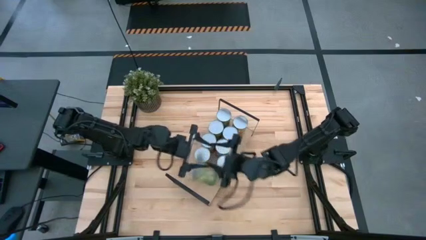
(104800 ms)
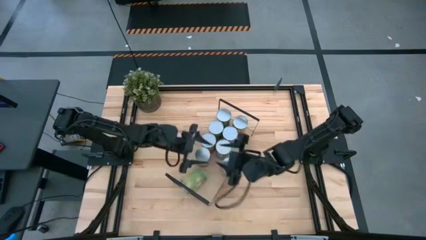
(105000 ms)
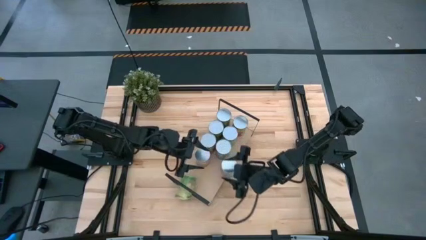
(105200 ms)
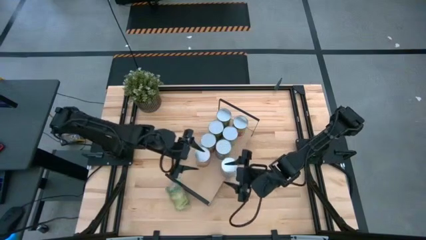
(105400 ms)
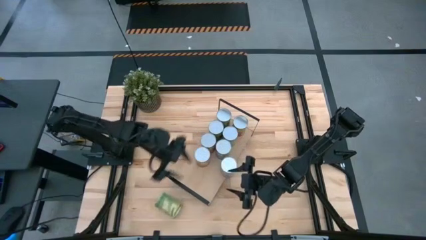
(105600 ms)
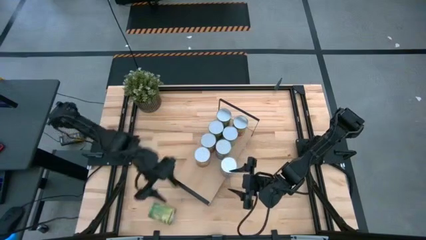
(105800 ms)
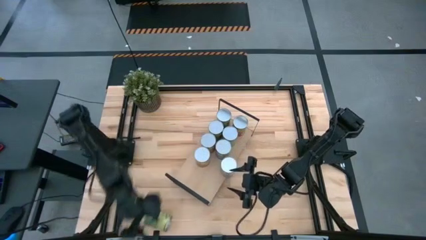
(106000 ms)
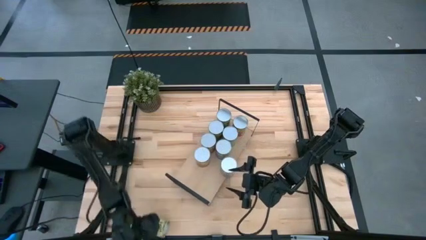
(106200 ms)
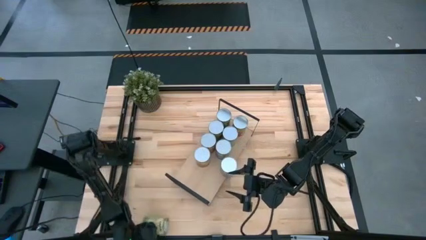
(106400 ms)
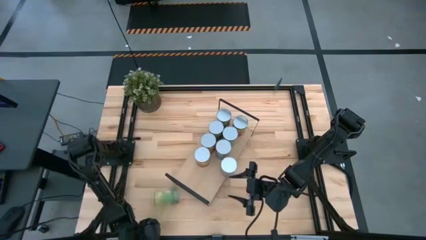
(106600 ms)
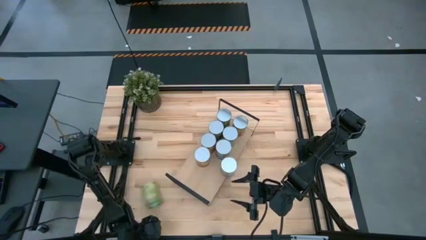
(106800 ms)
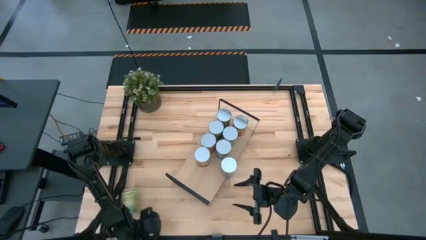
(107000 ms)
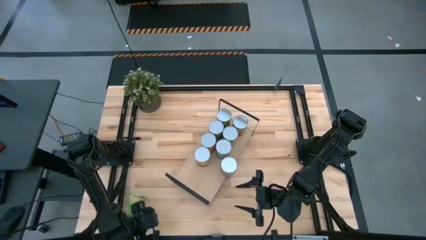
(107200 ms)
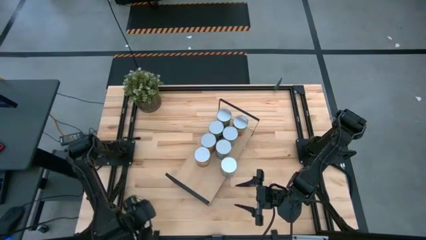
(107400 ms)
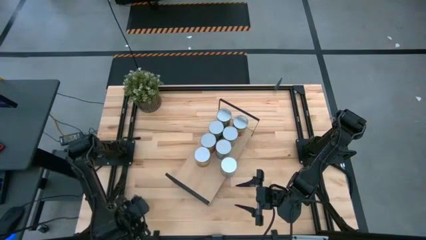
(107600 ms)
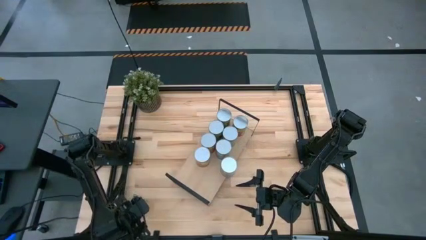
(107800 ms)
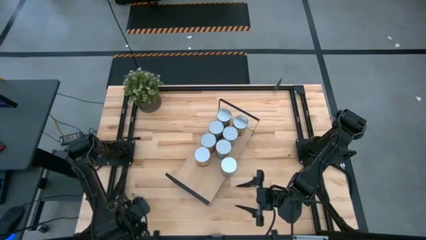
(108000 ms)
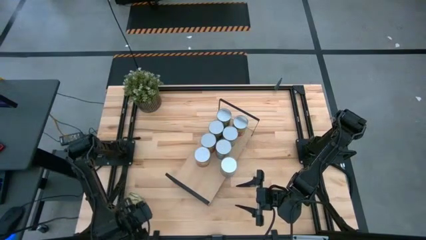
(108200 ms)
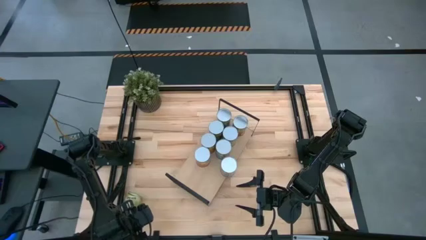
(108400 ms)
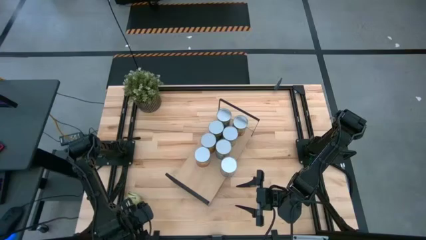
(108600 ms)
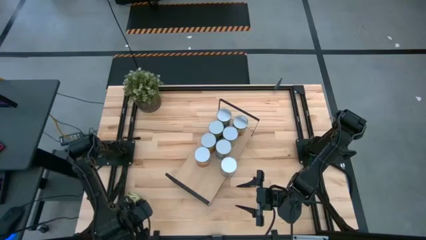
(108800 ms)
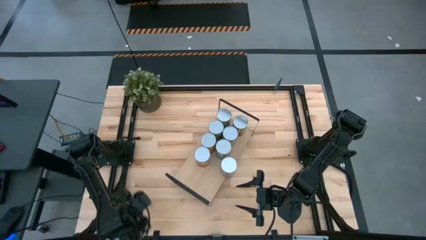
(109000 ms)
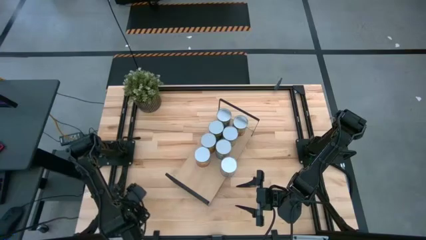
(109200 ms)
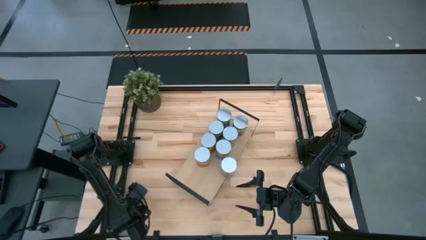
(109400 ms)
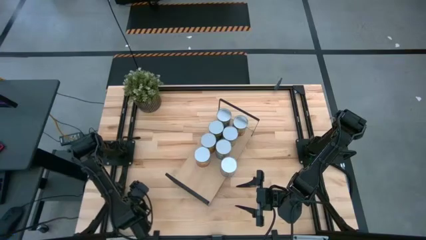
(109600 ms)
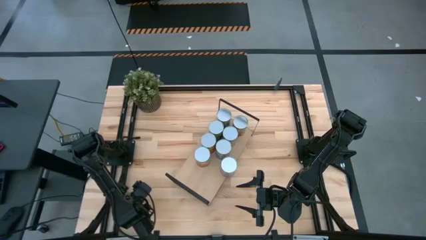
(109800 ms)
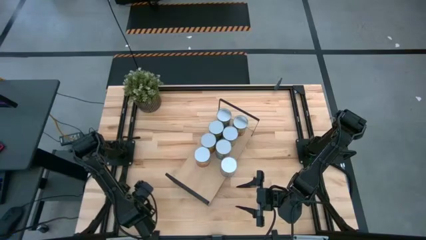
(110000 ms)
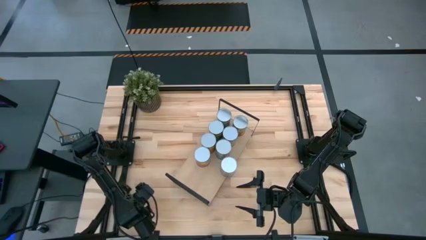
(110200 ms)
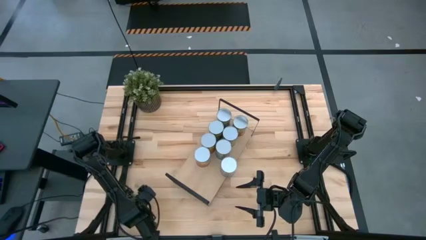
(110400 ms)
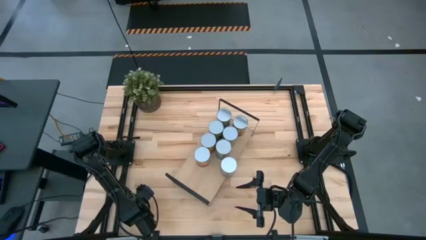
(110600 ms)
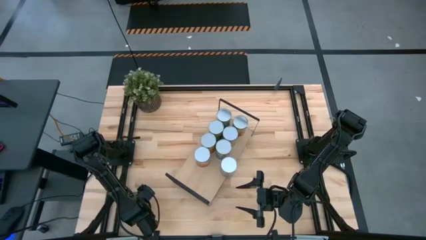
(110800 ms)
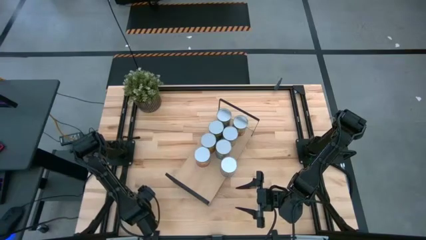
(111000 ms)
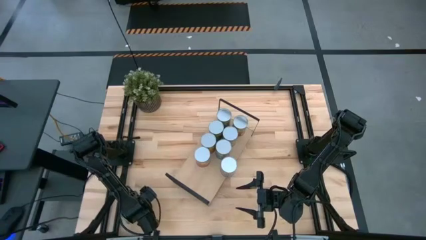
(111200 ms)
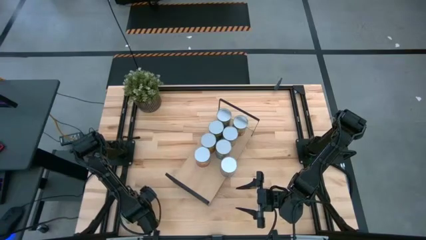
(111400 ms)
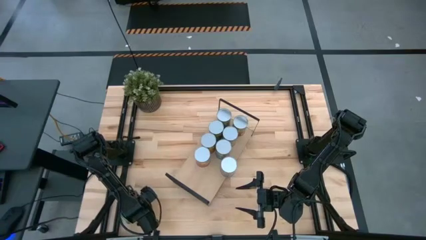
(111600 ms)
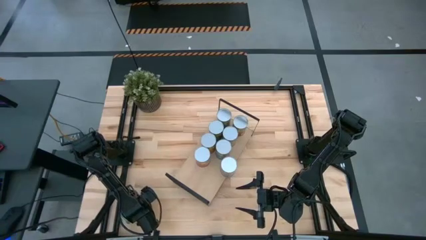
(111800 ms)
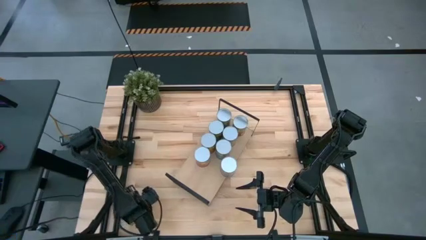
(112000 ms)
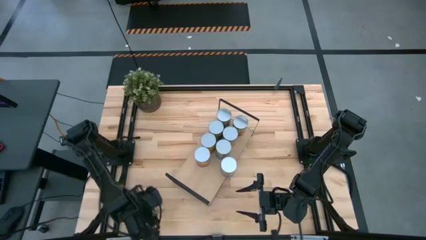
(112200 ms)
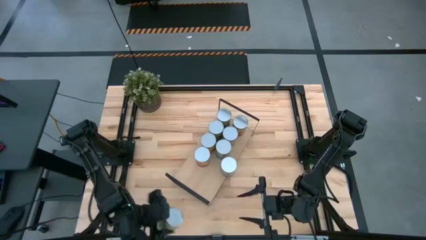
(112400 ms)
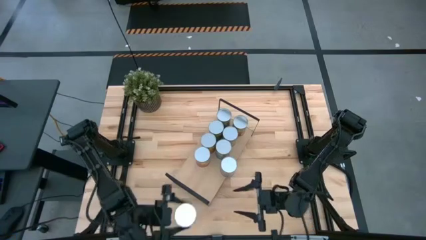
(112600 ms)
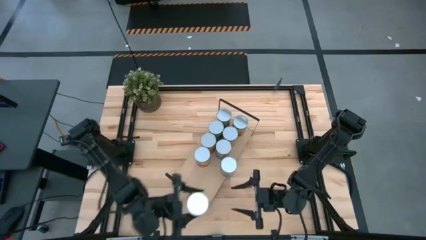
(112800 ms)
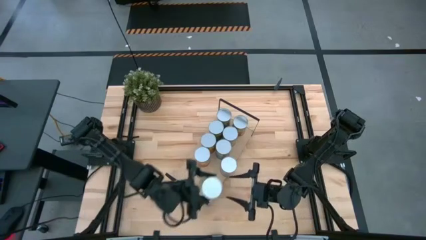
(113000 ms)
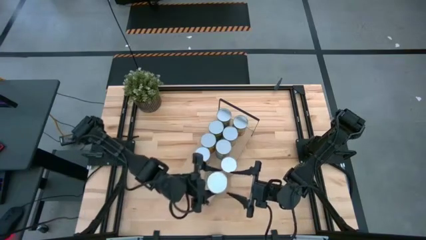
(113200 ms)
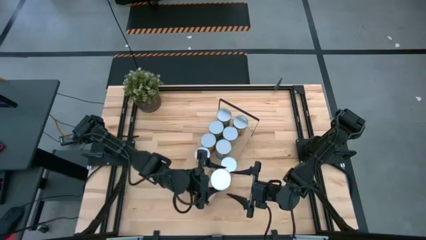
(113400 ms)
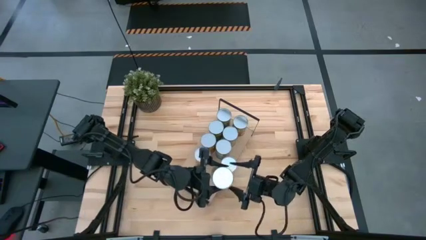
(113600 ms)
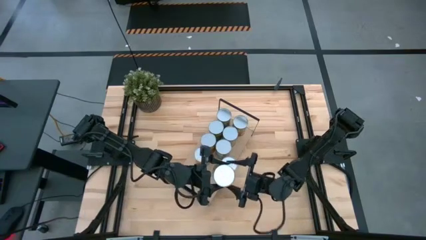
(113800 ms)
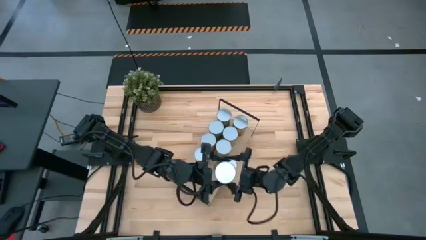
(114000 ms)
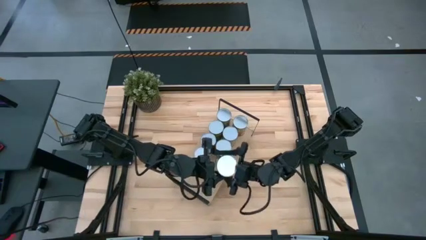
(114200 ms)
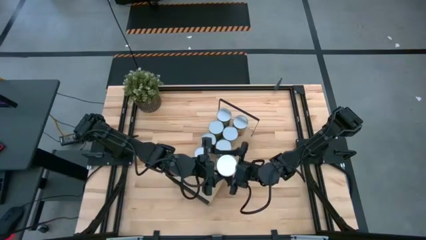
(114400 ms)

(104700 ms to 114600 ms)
Task: Pick and place cans onto a shelf
Put the canned pears on the shelf

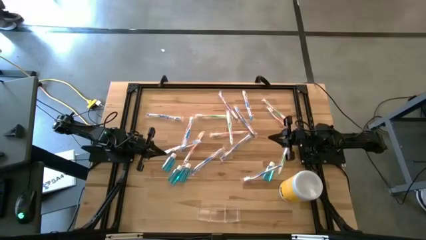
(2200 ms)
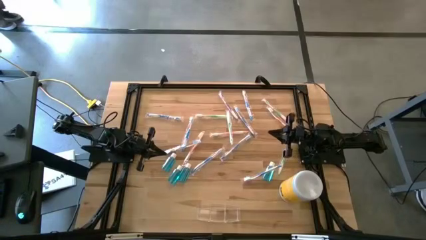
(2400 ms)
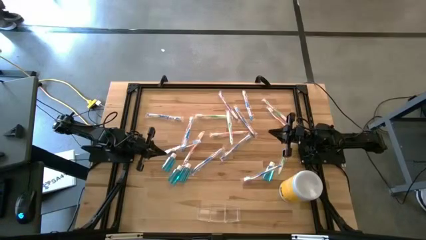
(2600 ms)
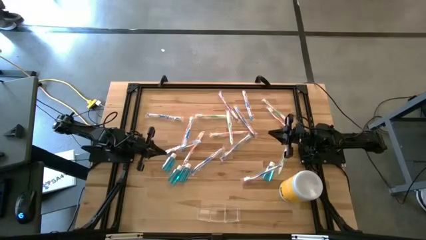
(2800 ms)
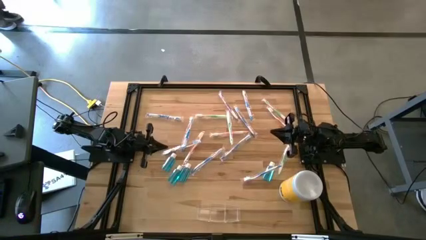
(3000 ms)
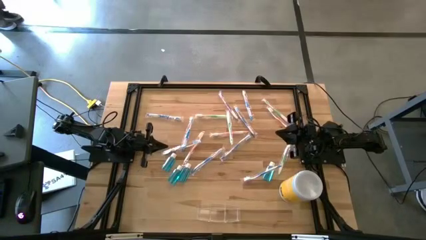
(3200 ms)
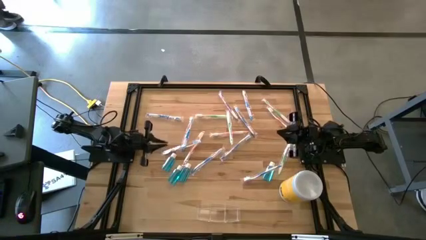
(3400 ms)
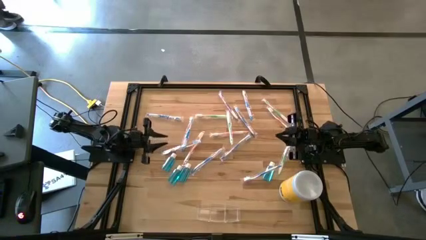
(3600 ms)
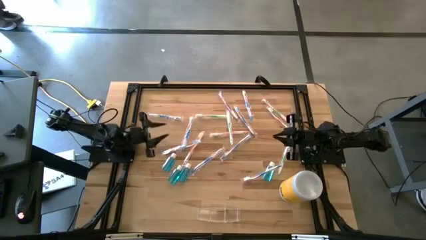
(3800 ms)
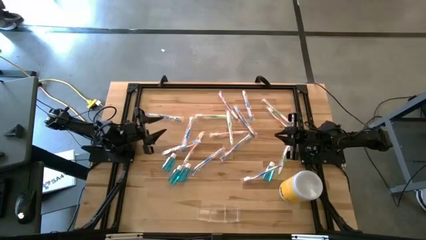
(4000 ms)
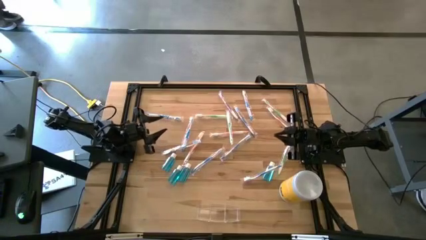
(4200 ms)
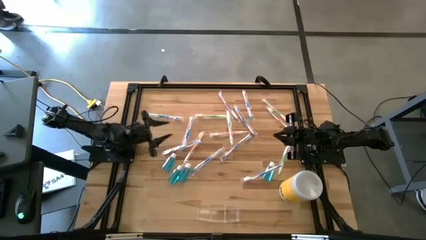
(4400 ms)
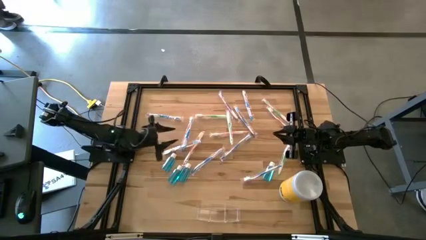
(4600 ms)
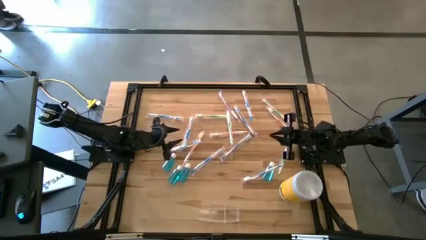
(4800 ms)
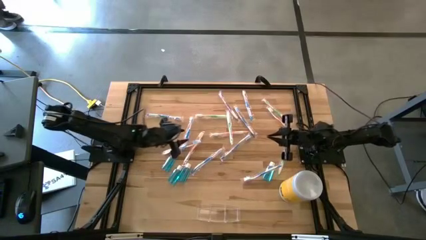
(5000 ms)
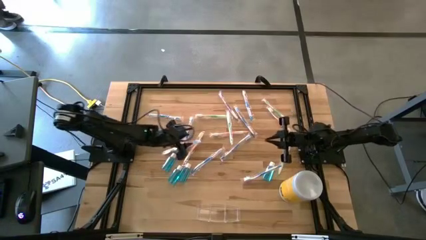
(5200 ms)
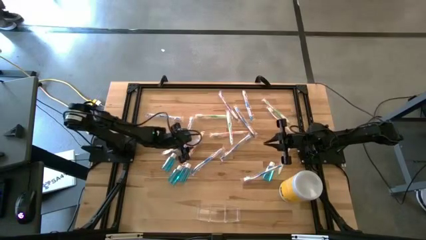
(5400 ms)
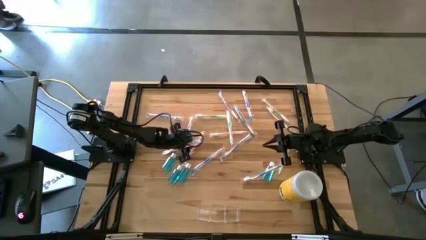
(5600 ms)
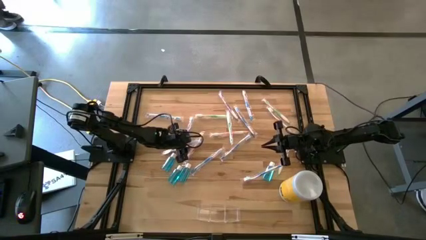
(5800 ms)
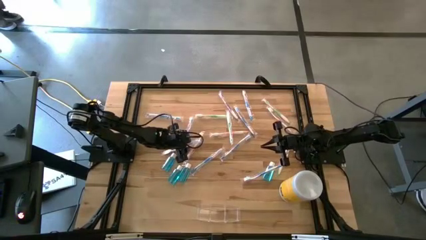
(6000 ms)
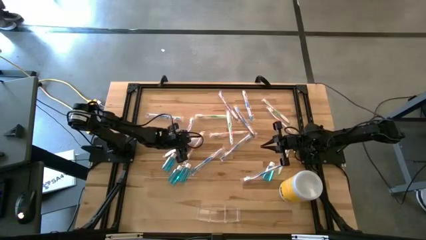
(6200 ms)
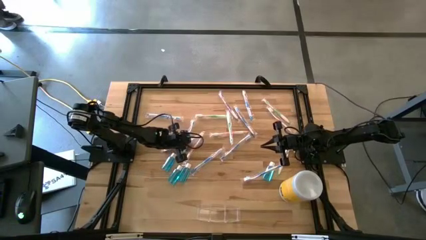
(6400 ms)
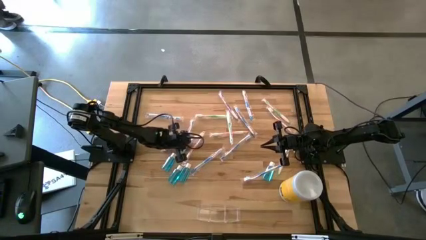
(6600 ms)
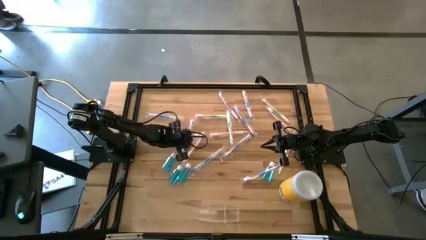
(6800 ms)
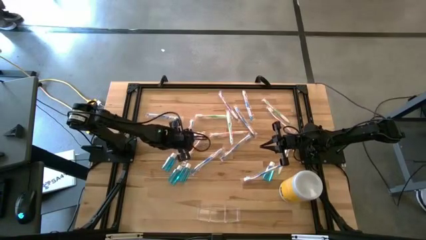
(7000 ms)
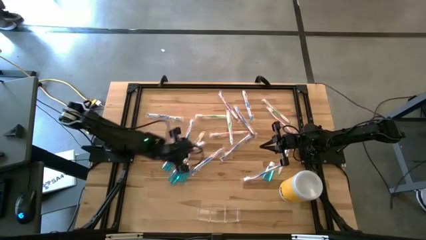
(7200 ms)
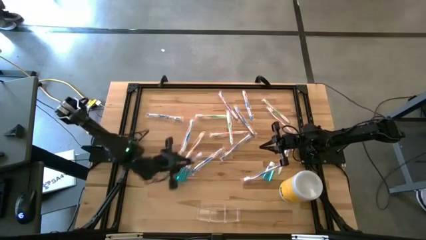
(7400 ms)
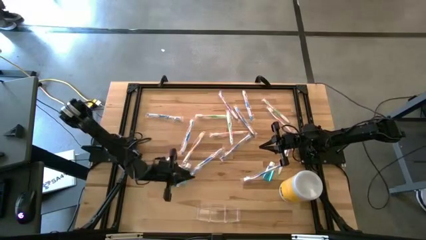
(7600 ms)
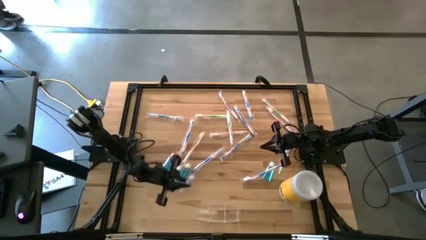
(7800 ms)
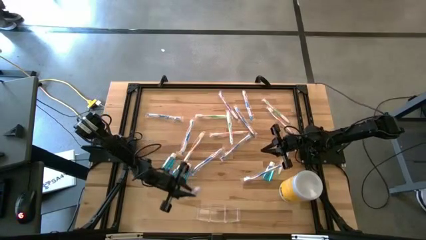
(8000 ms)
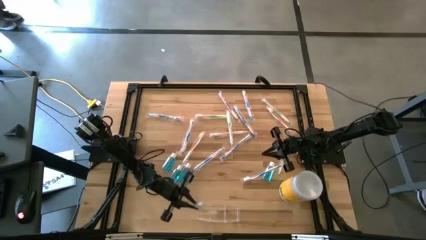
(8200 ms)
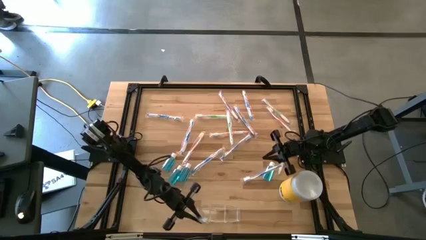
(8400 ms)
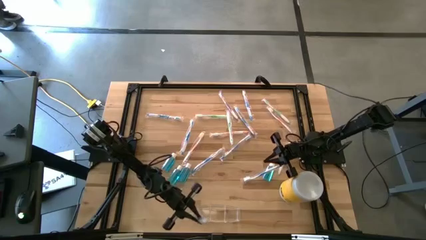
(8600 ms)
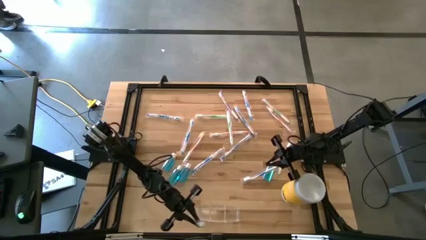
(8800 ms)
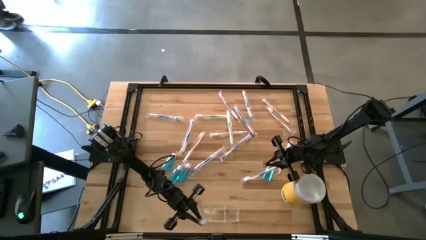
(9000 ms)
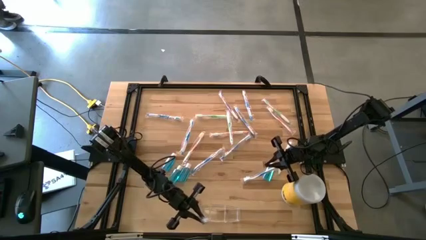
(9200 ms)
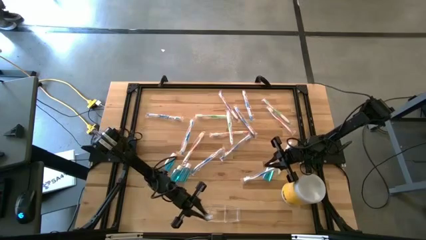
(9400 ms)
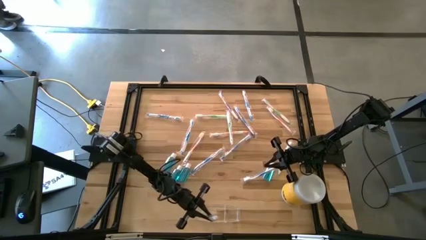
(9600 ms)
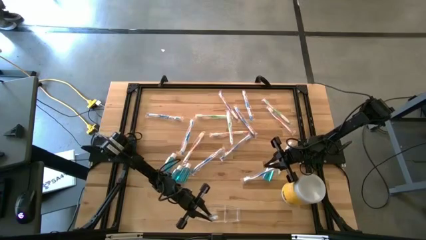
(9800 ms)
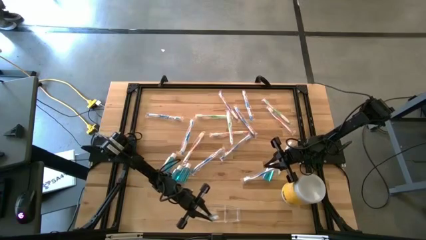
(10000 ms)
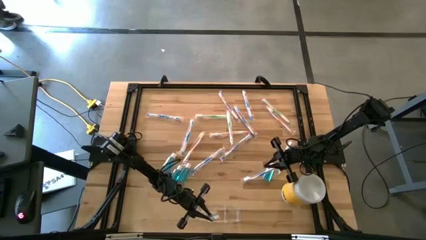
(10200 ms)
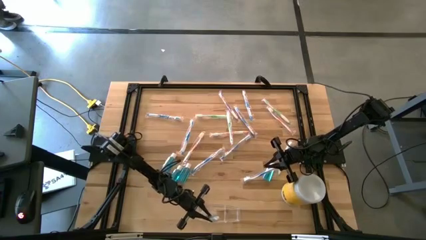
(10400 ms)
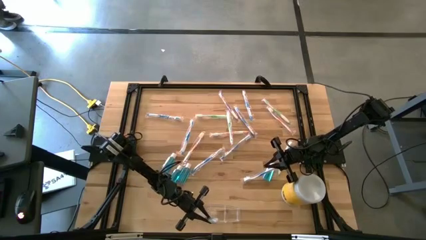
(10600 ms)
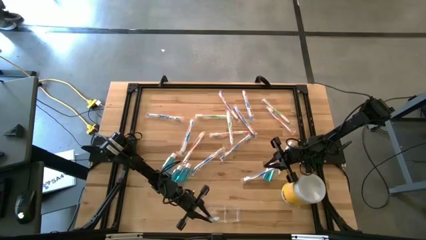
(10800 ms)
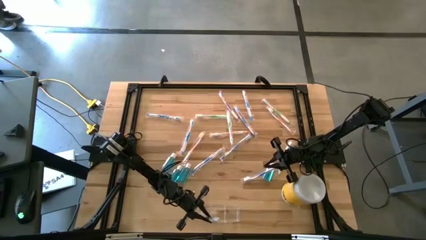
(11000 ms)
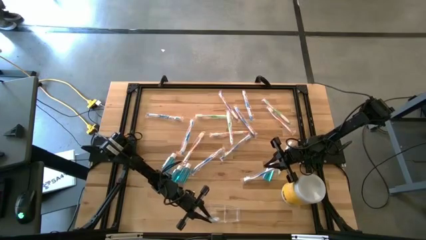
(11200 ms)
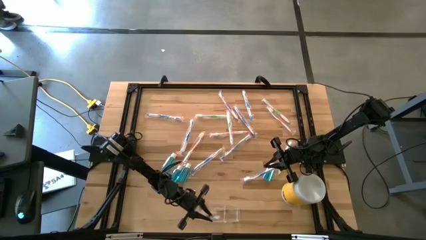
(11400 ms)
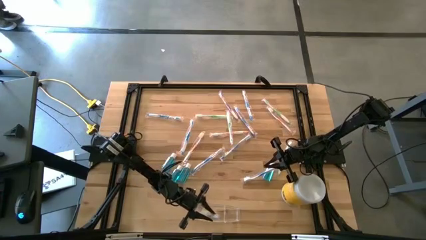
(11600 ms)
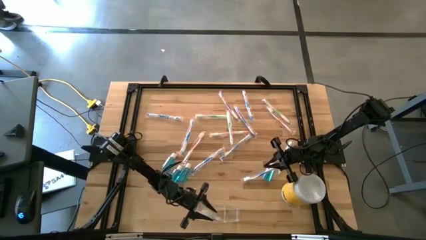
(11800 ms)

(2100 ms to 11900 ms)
Task: Pick & Place toothbrushing station
Put the blue toothbrush into the transparent organizer
